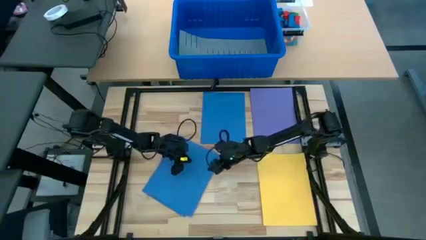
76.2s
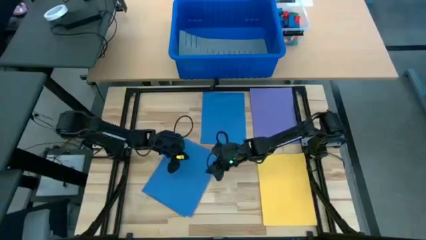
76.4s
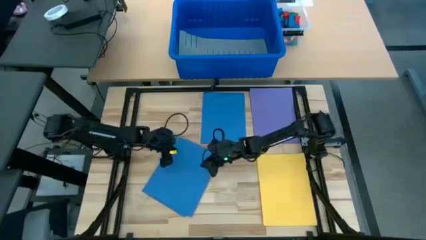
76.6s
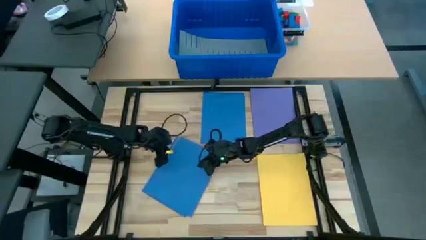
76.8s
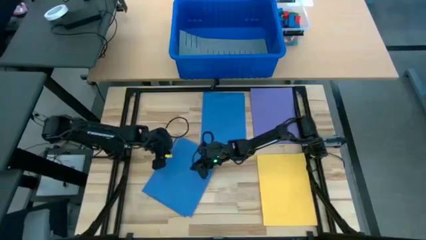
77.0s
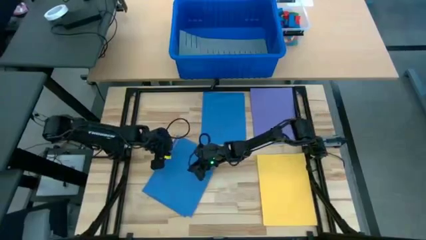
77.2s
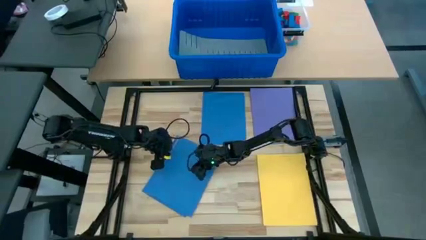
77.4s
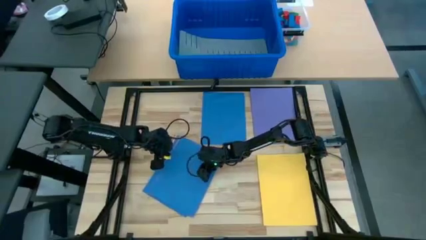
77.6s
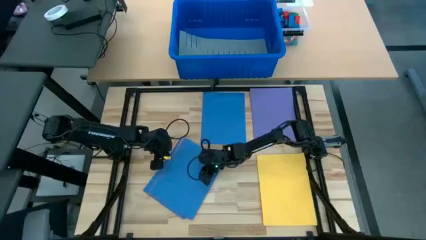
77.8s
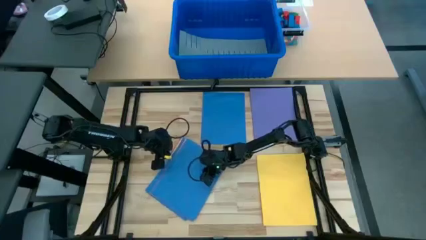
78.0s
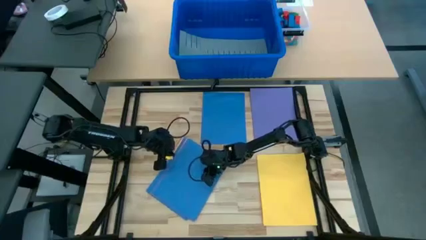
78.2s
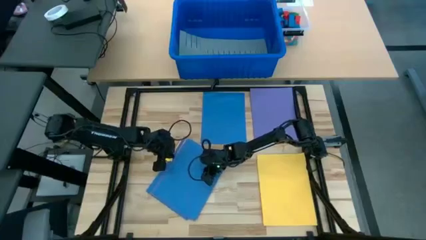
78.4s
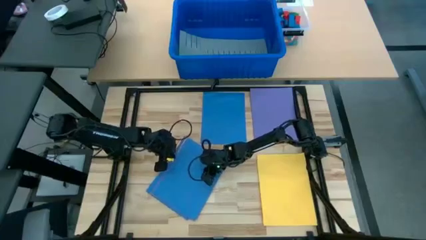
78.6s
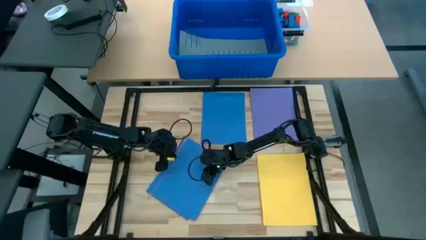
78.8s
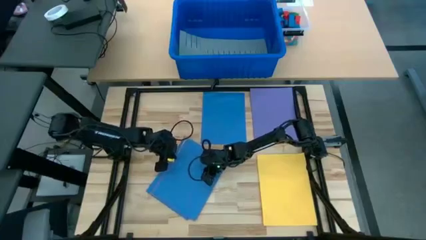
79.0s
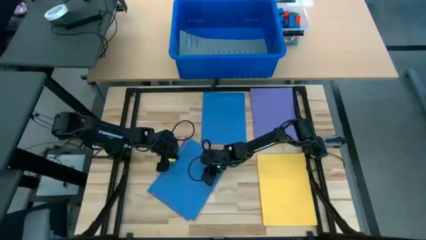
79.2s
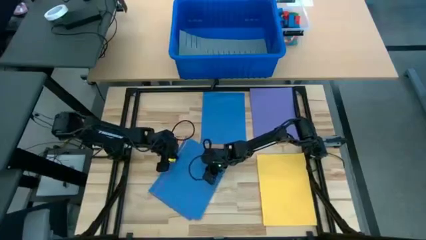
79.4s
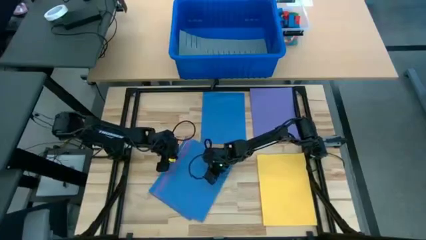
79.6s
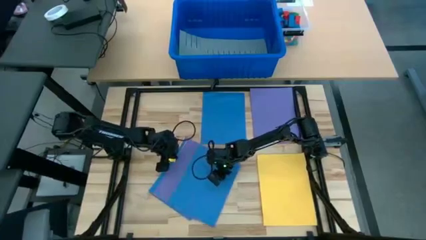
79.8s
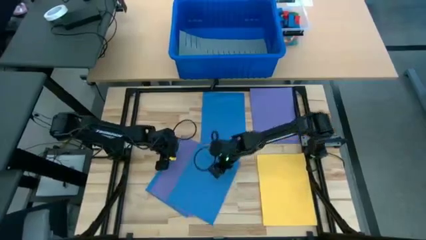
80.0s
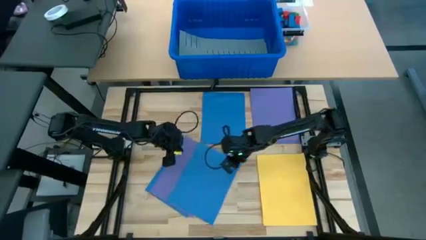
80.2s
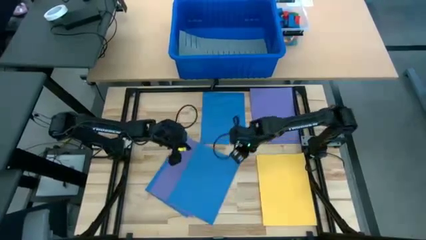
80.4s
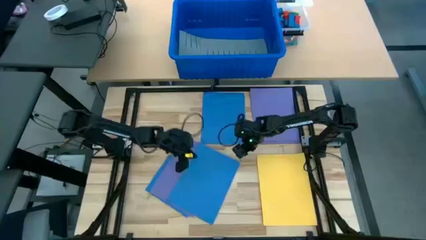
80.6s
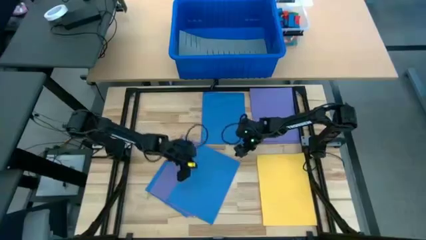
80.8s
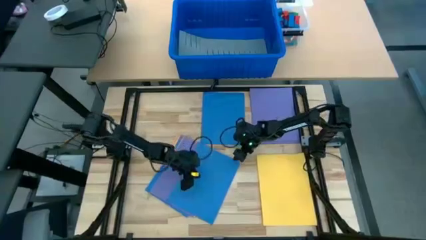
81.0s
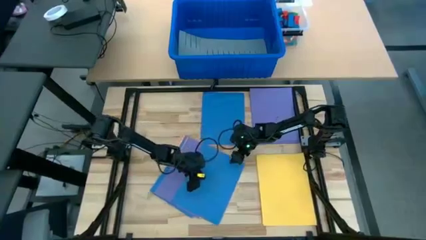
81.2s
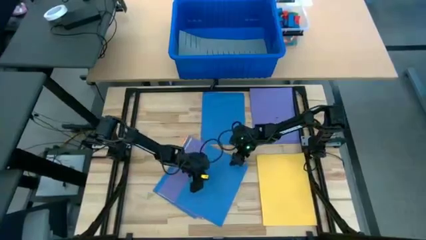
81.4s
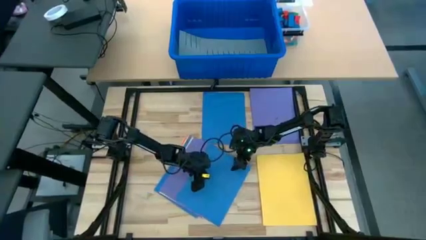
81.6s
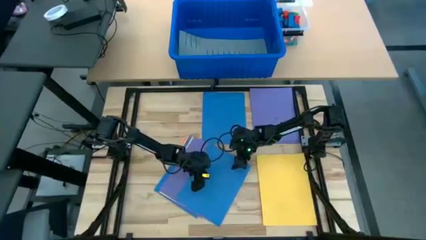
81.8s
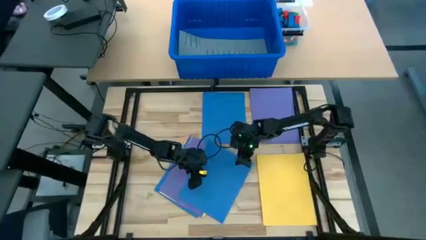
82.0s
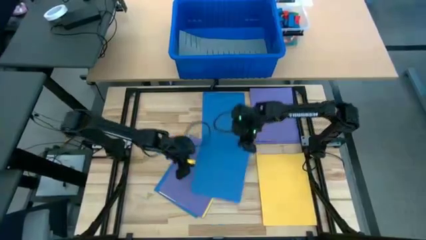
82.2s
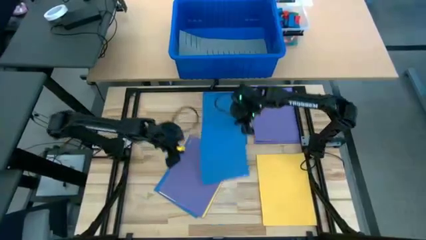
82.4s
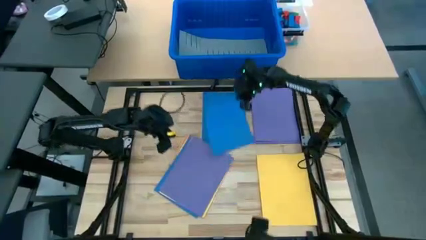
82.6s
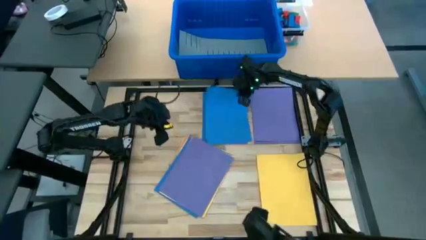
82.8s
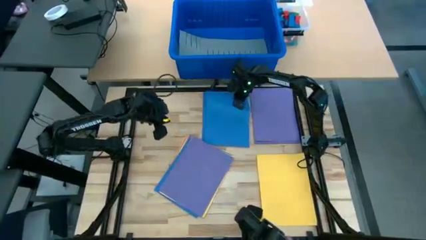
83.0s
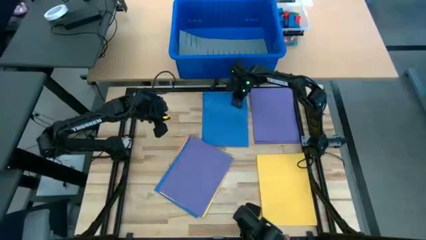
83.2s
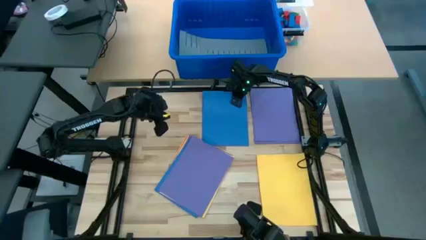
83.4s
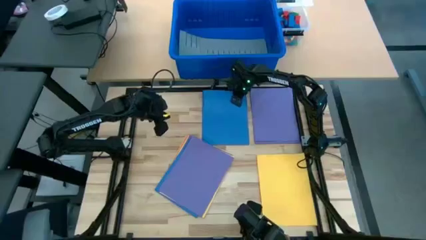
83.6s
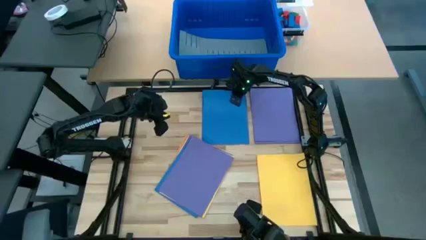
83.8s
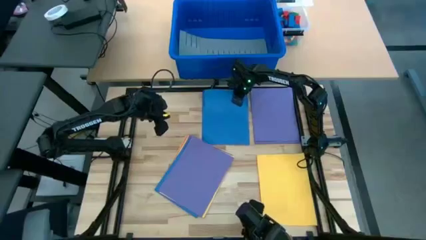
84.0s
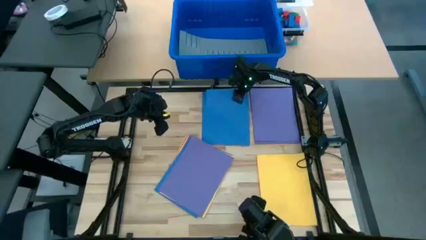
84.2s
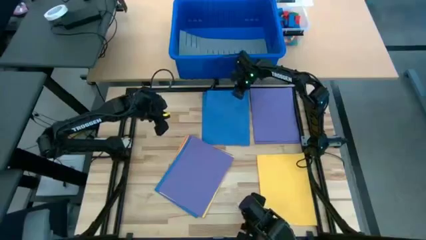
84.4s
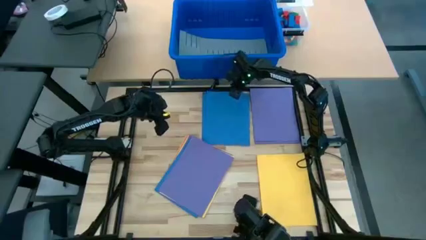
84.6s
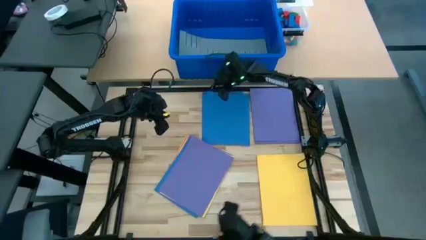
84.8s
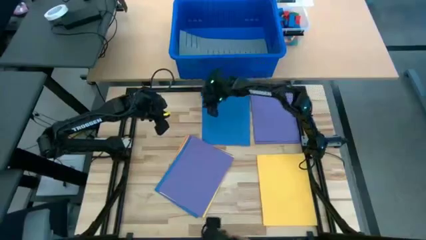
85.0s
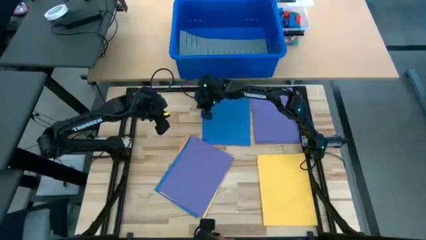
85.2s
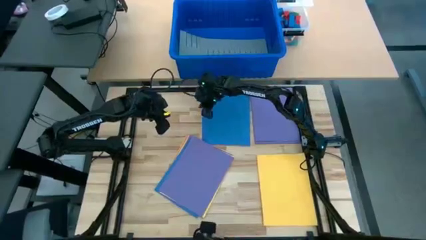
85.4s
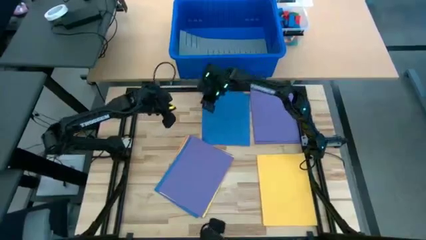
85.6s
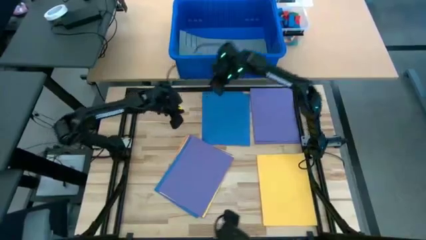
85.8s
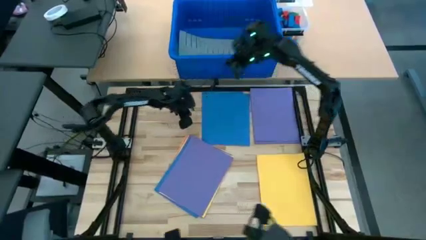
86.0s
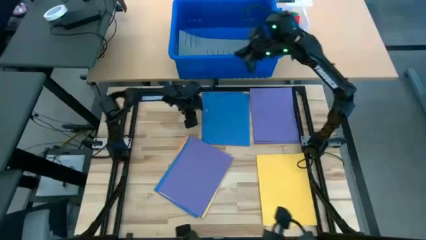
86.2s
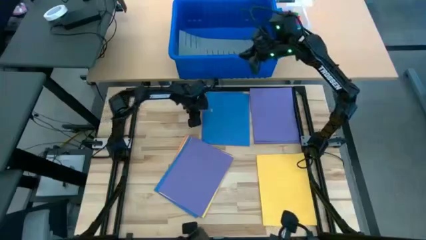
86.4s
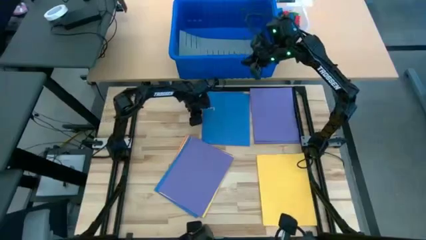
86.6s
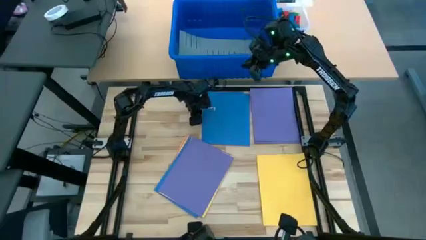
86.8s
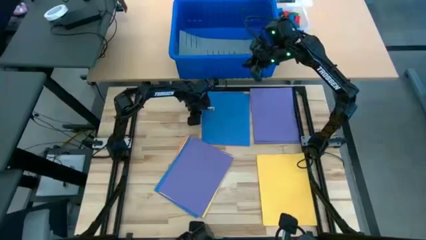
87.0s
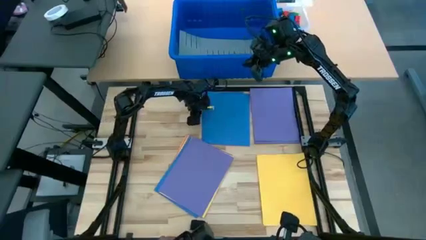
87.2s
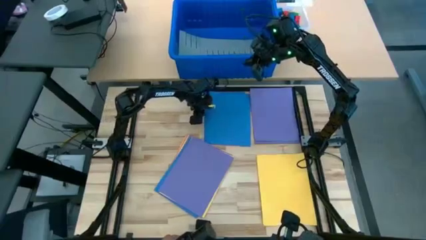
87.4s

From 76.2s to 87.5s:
Task: Organize paper
Stack the blue paper on top of the other blue paper

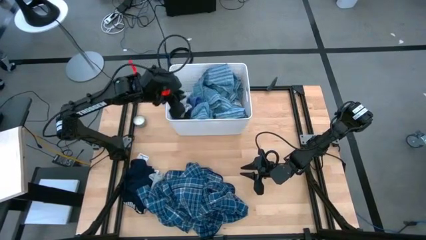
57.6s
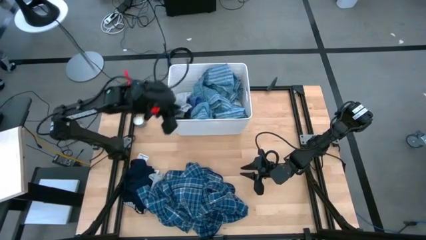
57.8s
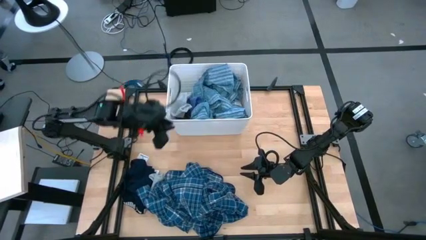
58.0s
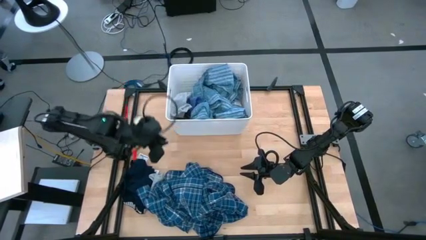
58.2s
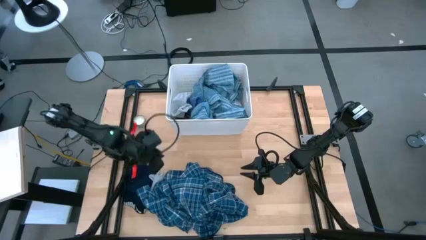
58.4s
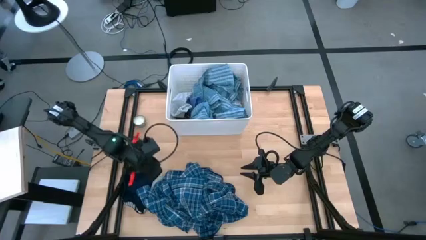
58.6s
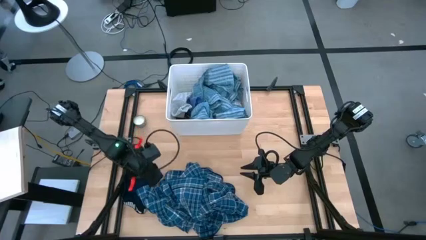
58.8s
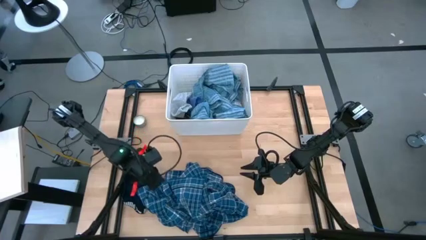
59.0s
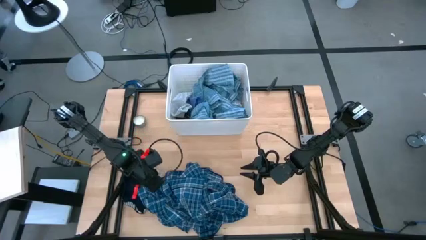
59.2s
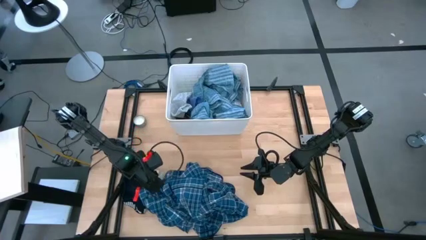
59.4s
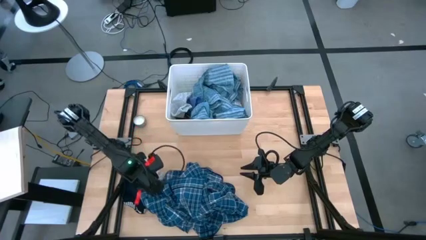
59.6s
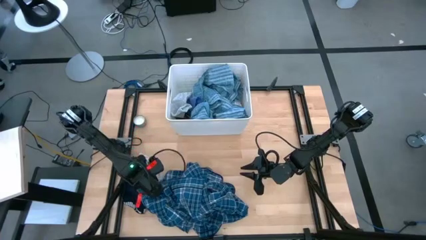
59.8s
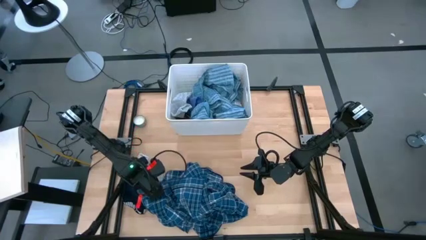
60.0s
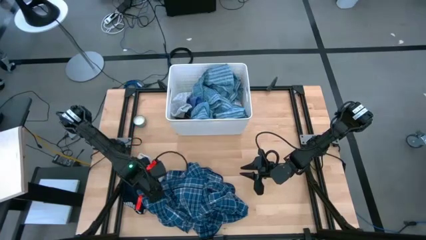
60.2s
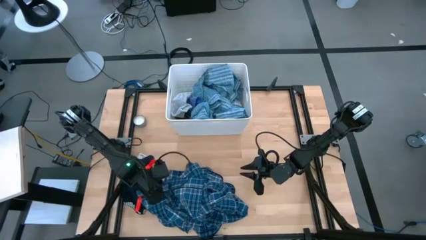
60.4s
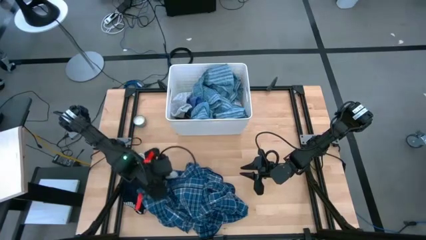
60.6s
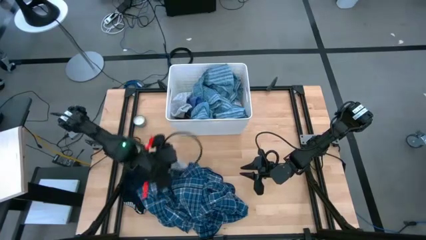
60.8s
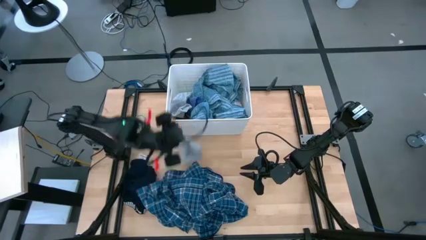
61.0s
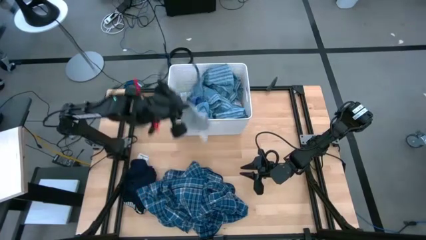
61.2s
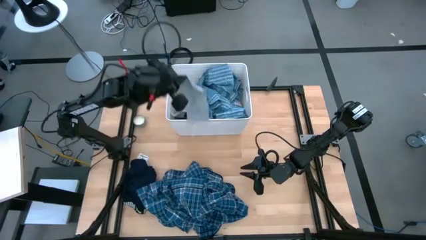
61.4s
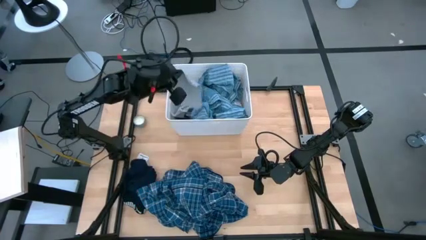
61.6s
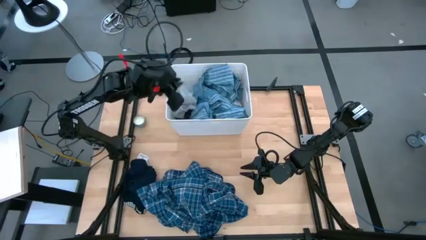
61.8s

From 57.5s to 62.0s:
Task: Sort clothes
Put the gray sock into the white laundry bin
